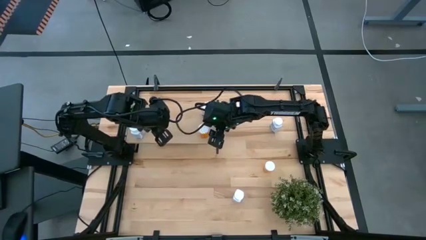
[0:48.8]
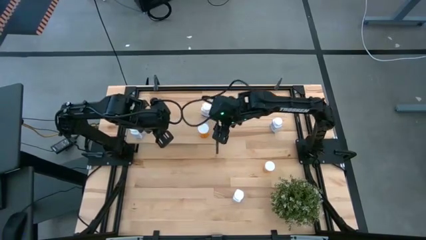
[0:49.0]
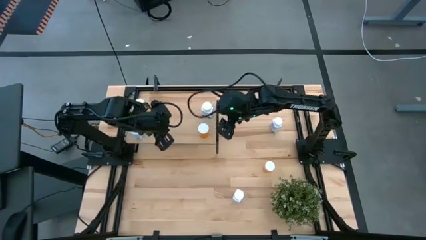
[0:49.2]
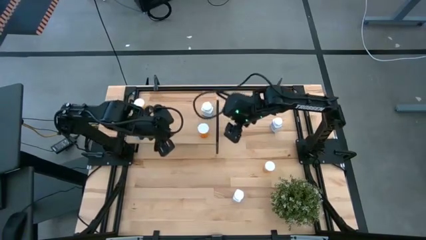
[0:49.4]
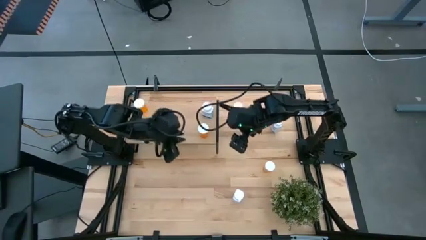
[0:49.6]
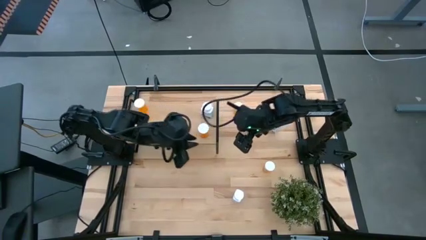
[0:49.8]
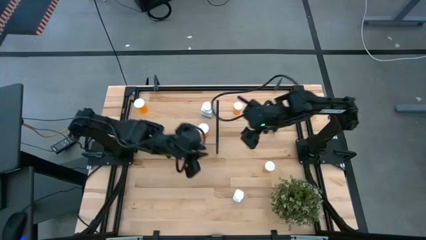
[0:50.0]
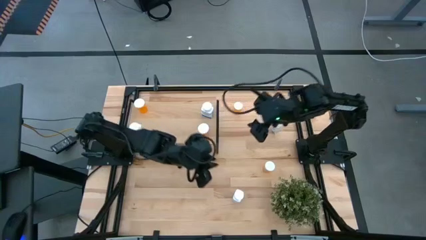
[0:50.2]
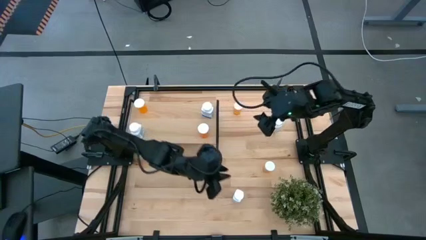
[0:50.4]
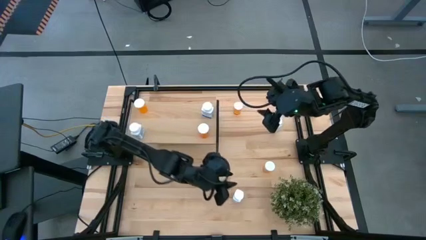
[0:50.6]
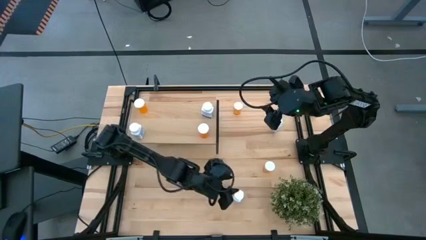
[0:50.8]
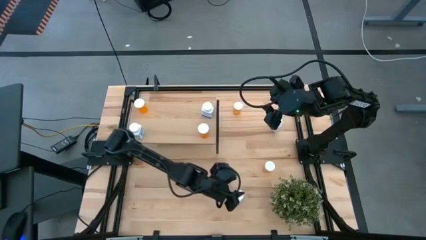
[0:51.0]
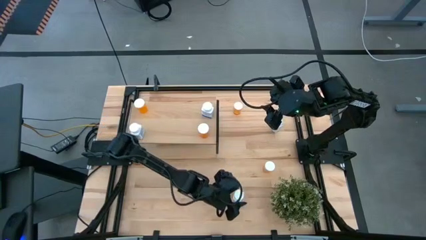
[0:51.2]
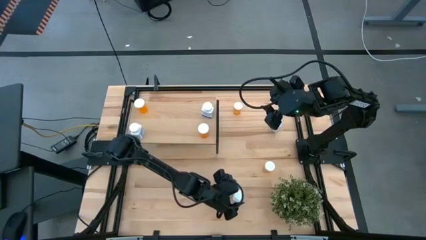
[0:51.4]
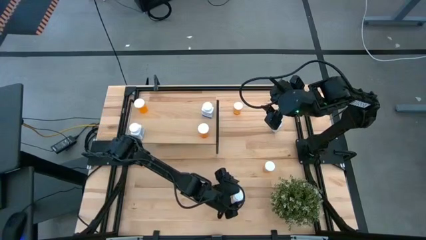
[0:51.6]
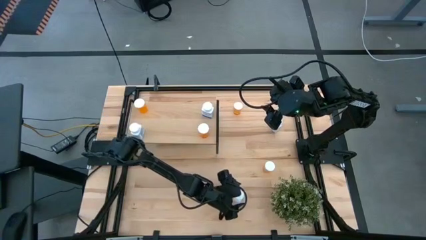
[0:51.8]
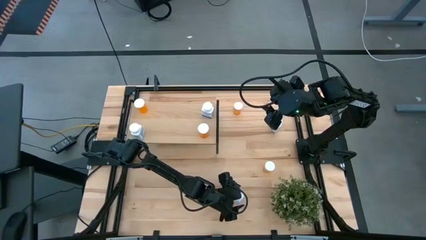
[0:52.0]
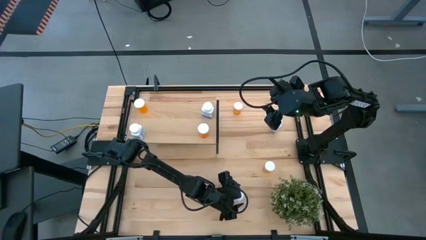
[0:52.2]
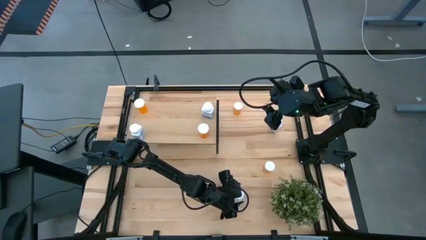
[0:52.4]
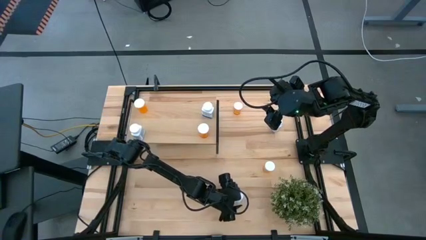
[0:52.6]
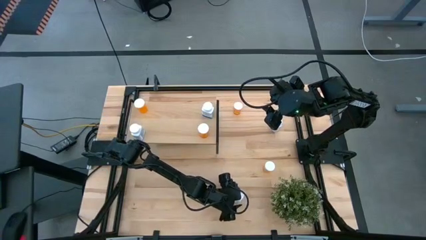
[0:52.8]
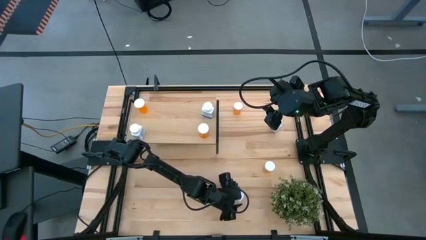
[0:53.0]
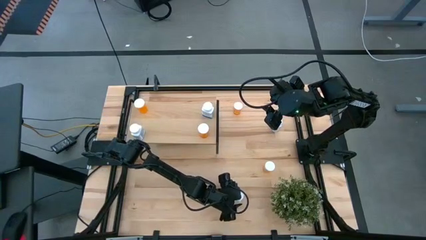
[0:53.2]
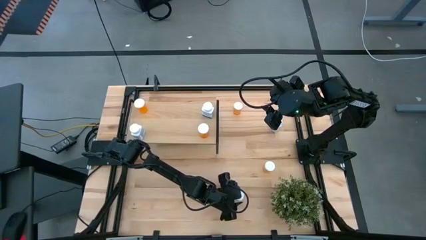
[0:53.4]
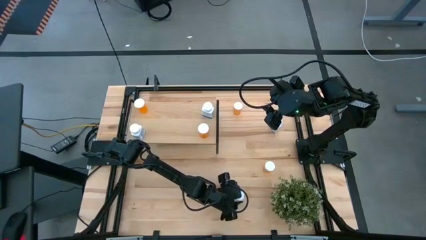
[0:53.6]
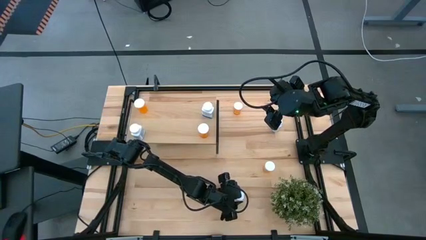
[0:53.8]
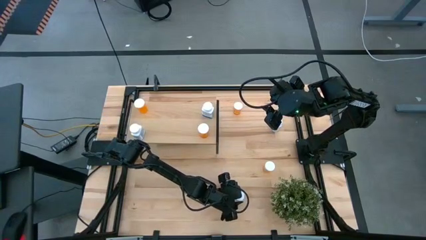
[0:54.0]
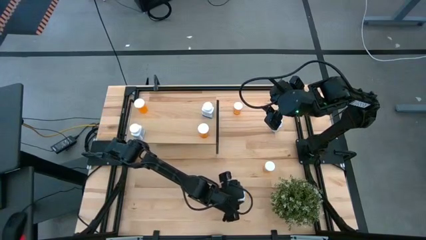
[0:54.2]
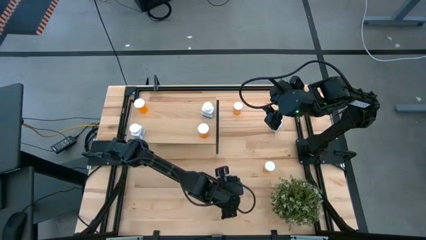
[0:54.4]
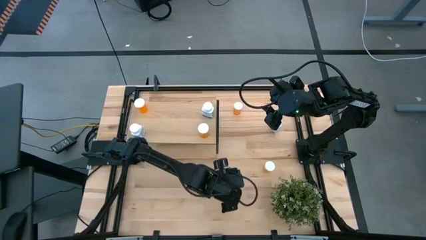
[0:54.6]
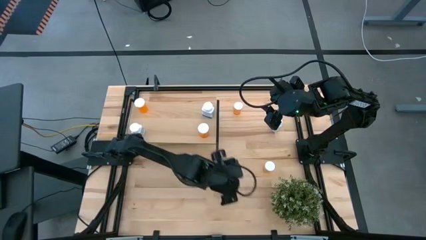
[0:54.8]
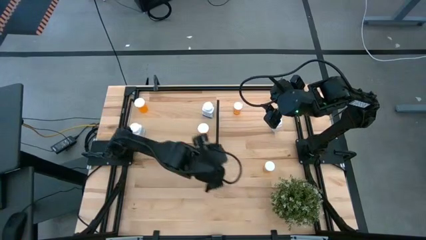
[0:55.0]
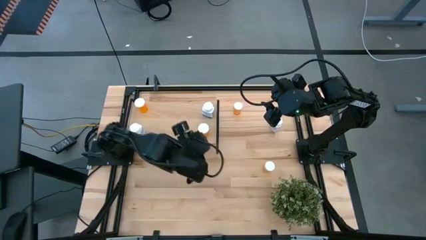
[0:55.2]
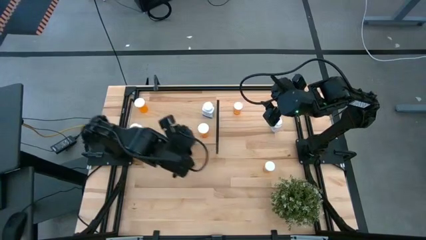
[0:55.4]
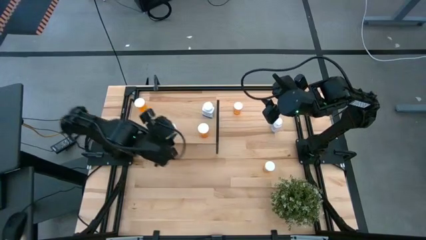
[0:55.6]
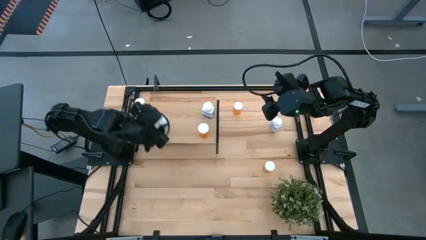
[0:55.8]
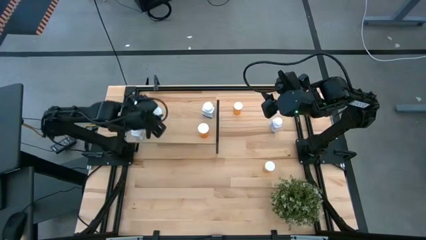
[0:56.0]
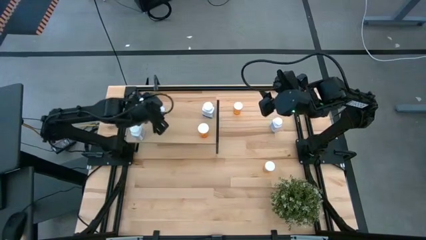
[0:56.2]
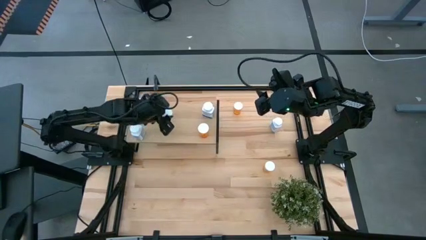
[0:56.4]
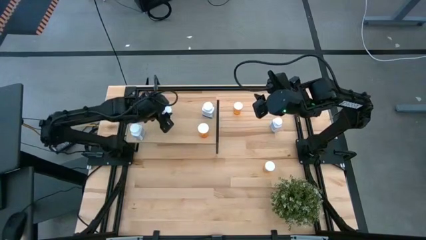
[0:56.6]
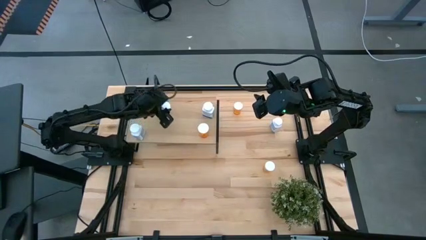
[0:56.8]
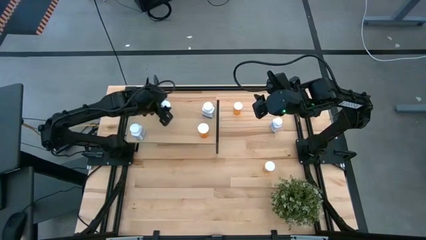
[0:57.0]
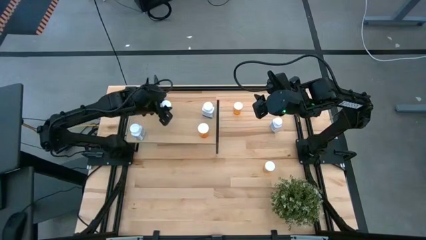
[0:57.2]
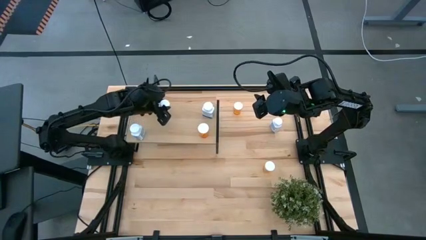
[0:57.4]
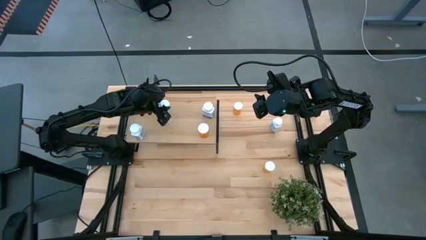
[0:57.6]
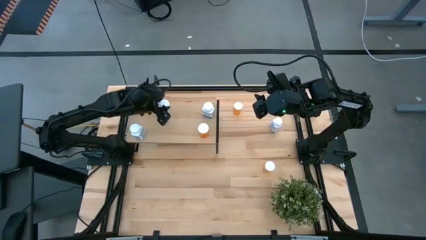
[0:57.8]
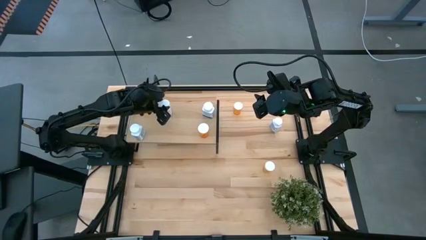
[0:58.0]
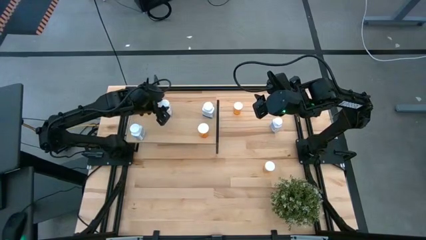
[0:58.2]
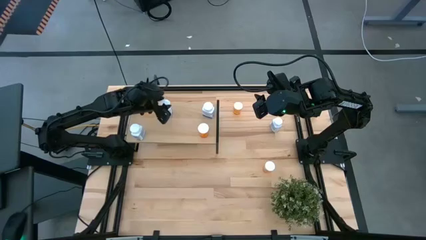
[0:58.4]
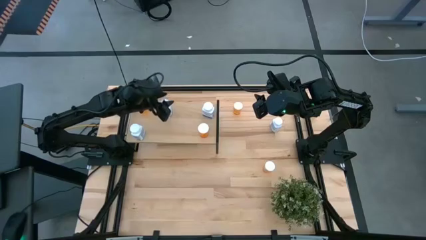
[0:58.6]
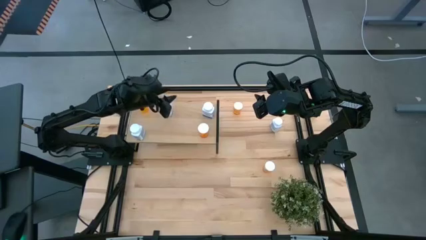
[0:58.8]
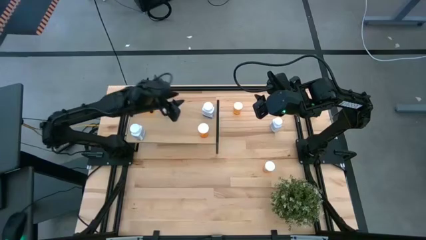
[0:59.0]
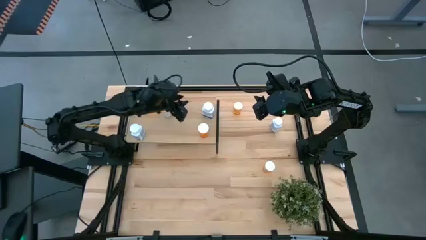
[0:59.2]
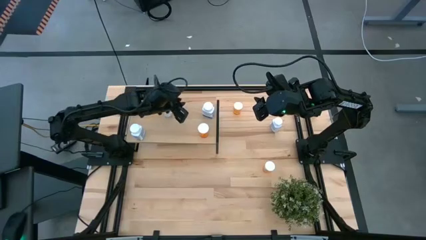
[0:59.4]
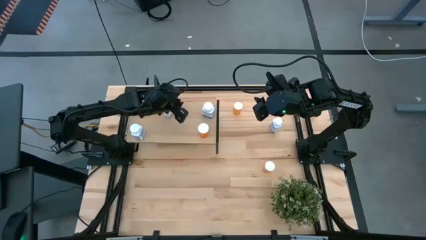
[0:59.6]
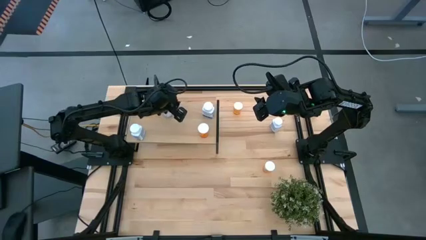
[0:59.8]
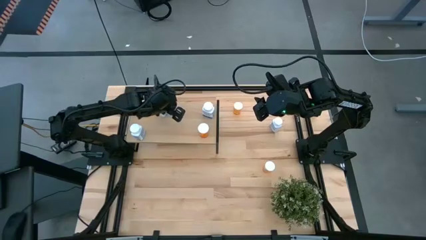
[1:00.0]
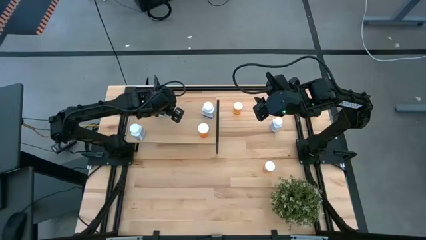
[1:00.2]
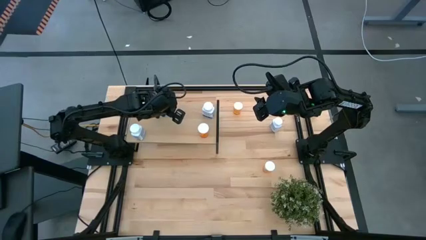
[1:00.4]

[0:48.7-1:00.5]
Task: Pick and place medicine bottles onto shelf by color
Put the white pill bottle on the shelf

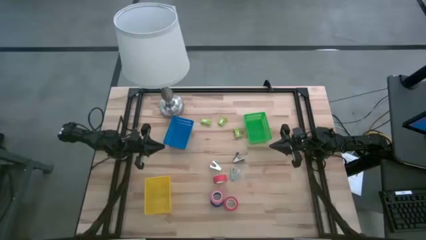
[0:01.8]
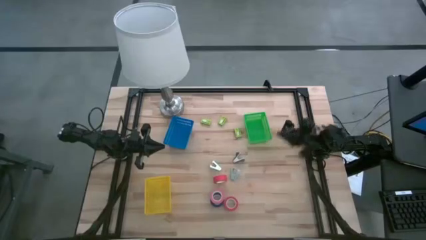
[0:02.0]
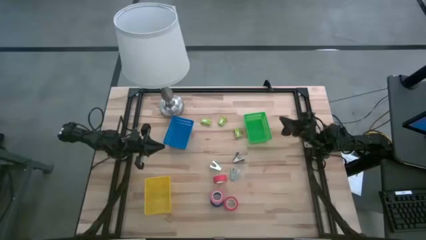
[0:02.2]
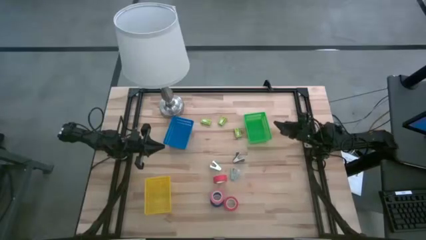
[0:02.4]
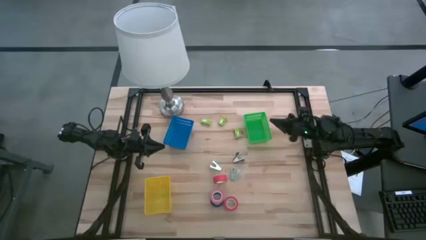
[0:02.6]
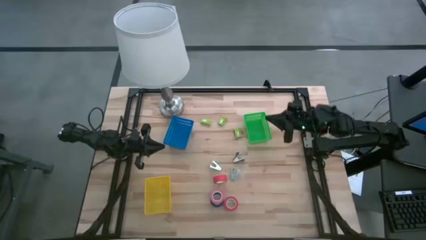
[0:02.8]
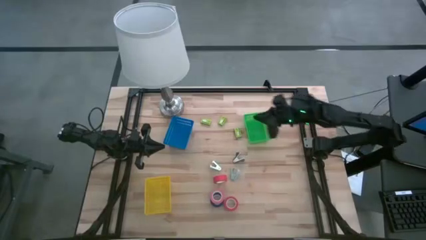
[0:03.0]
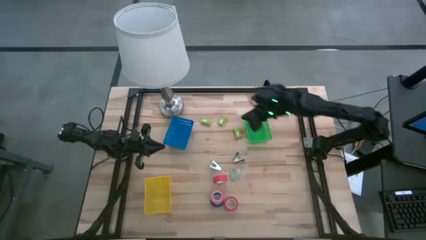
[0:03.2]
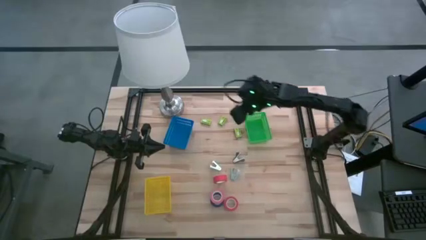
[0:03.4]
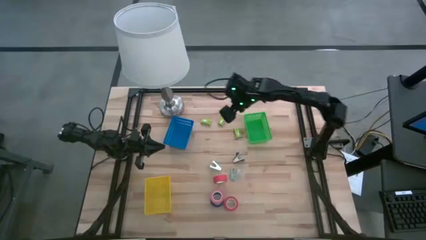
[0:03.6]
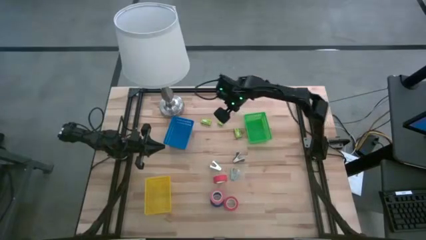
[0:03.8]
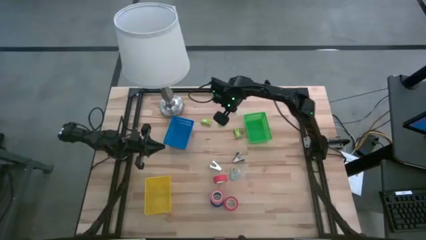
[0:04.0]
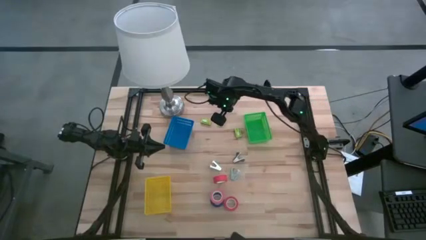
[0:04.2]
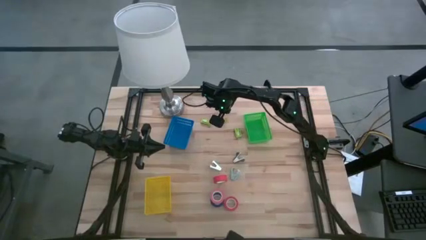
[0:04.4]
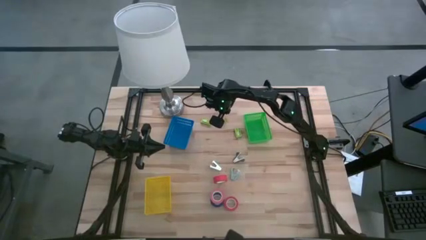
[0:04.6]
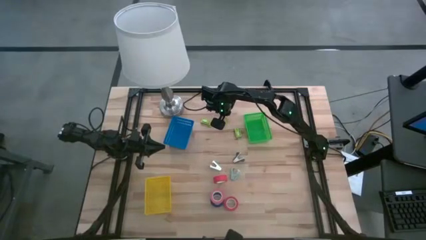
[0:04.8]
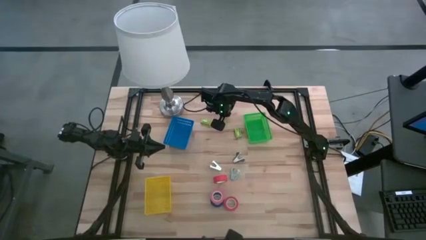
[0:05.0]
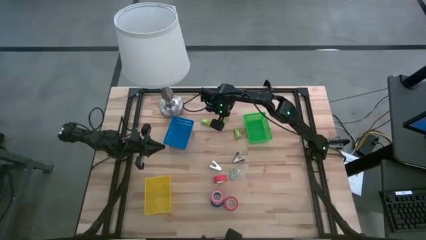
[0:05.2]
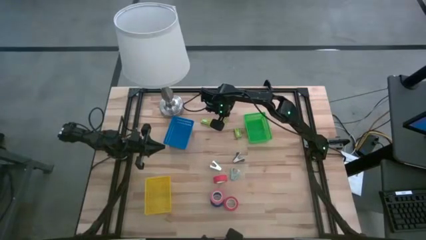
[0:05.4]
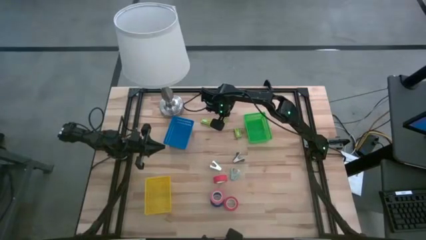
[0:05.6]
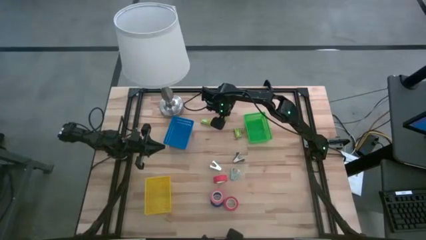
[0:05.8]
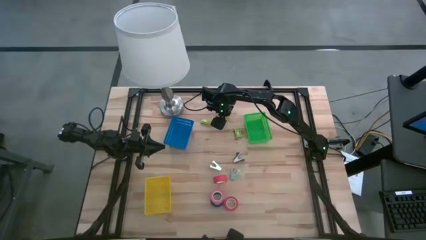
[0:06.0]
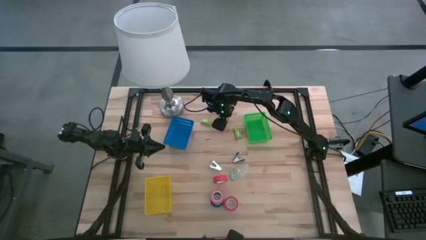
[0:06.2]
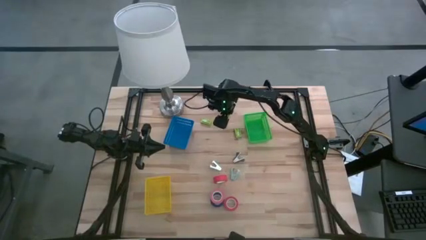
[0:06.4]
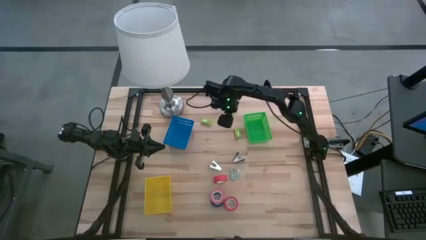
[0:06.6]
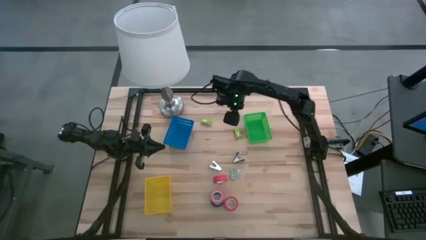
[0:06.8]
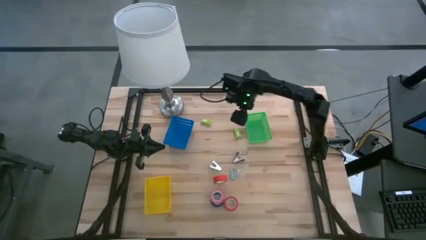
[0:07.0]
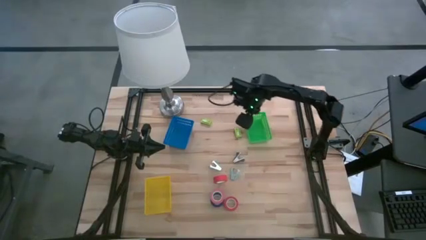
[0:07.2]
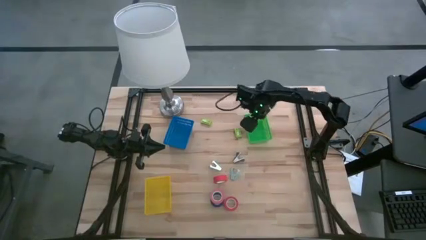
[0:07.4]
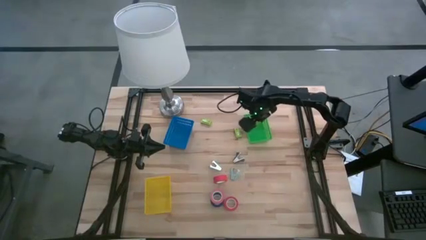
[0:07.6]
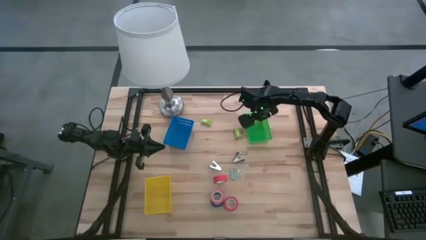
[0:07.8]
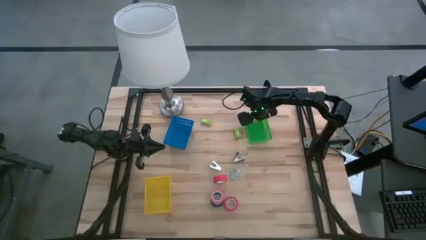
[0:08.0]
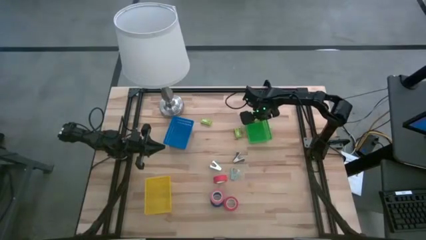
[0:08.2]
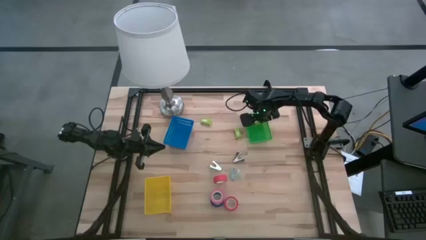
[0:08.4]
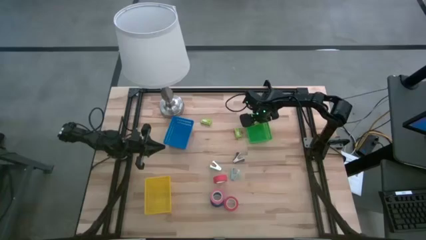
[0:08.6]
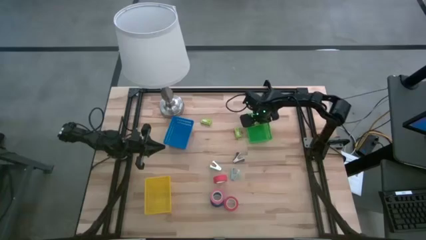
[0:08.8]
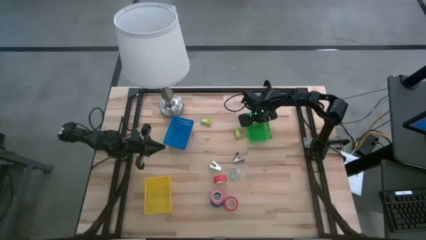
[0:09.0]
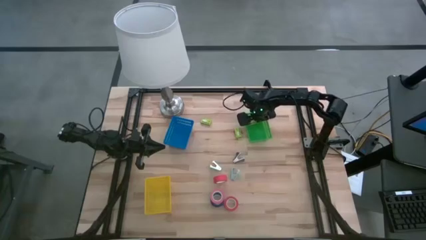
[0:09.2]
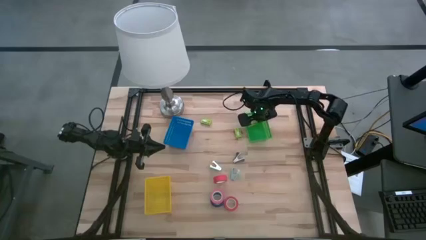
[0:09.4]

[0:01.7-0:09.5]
Task: Pick and place Stapler, Stapler remover, tape
Put the top right green staple box into the green bin
